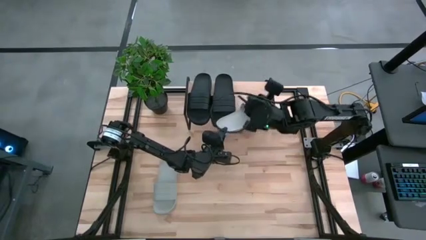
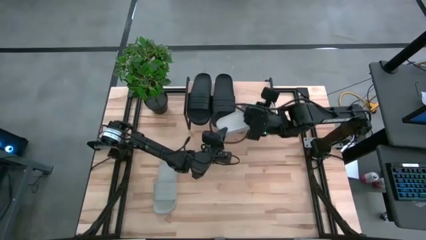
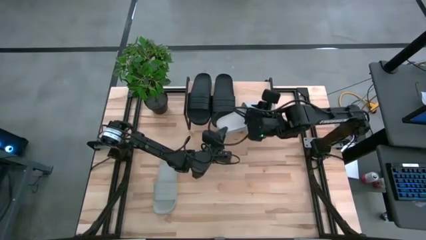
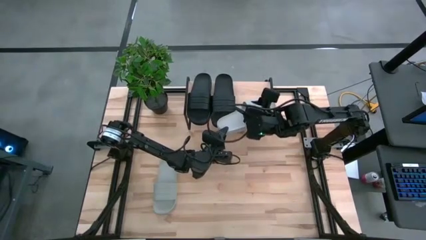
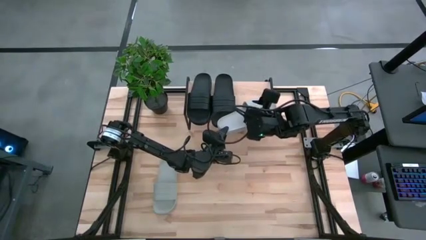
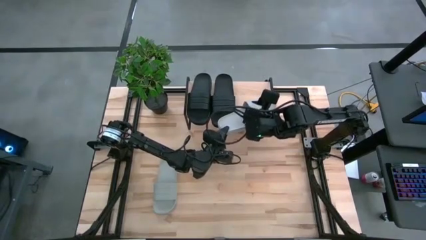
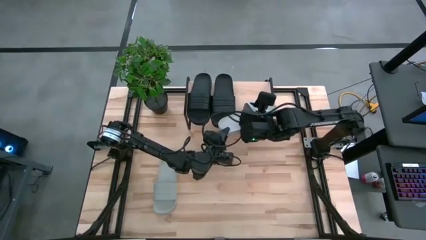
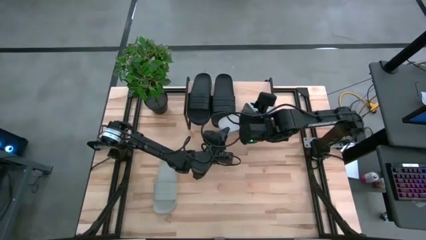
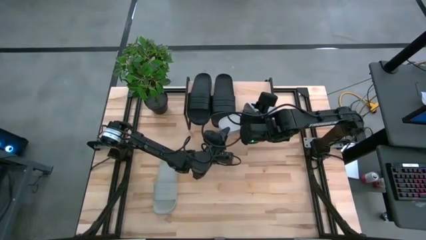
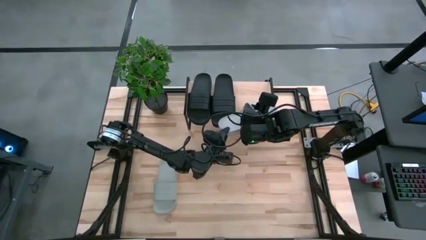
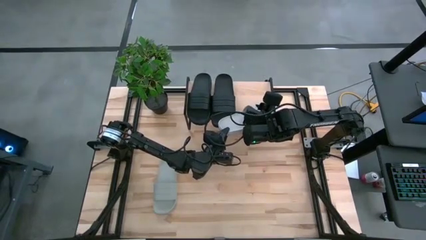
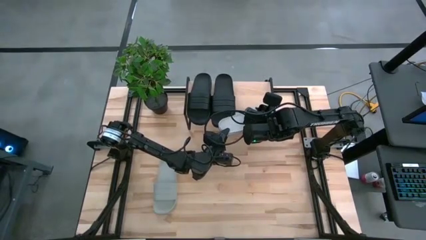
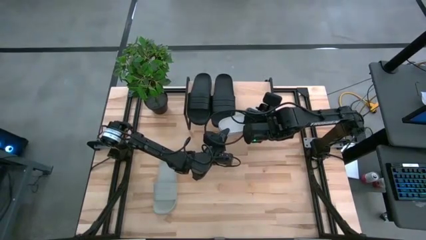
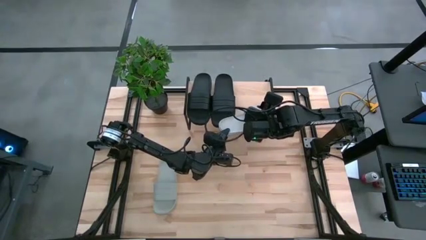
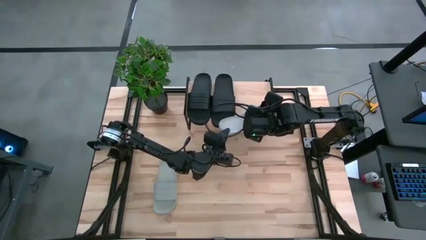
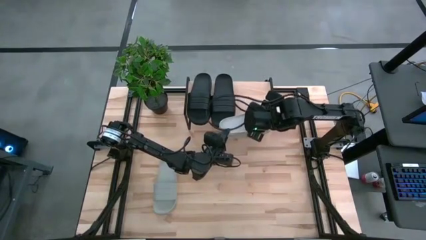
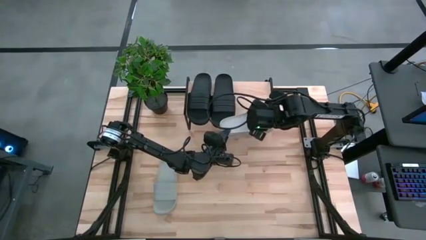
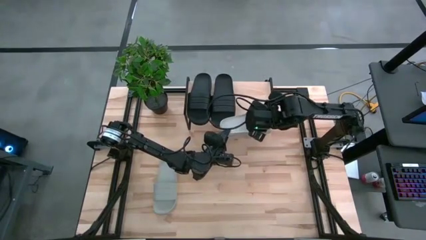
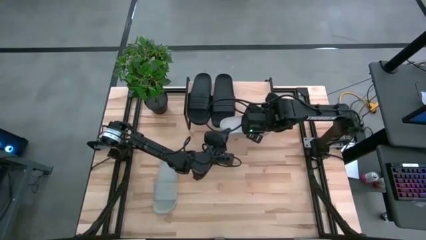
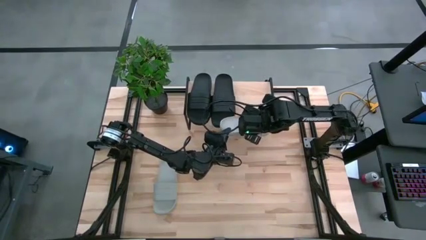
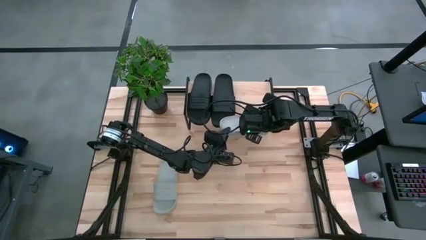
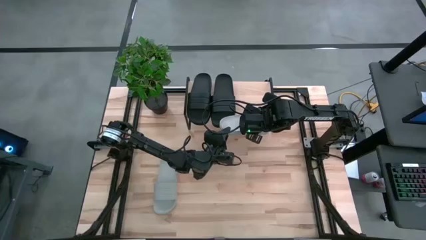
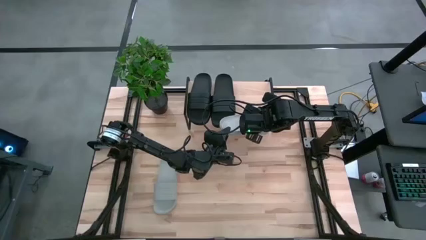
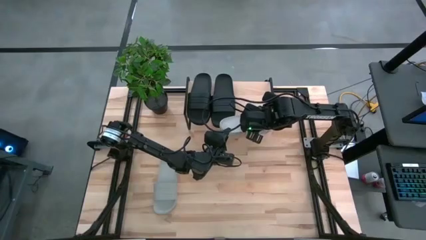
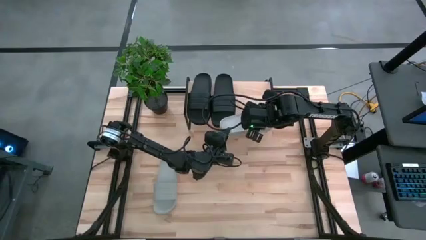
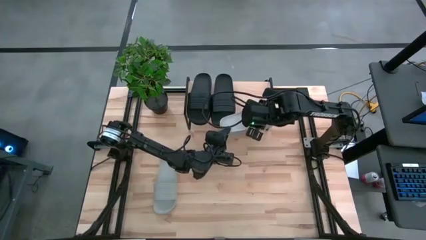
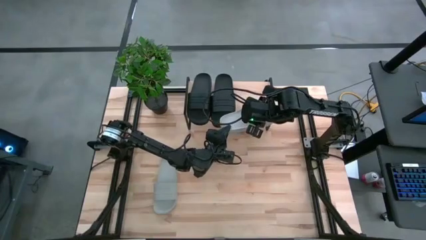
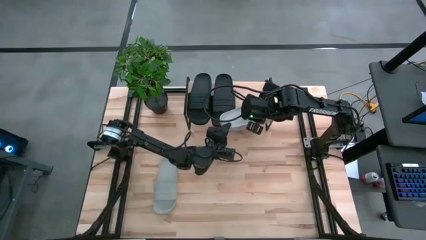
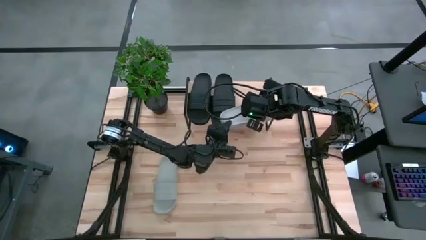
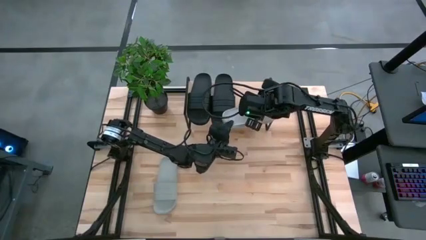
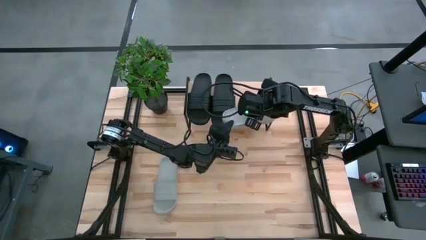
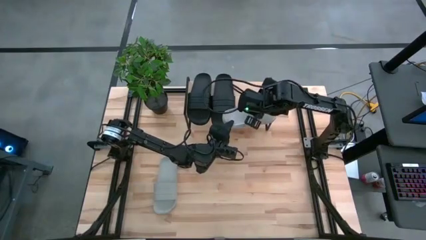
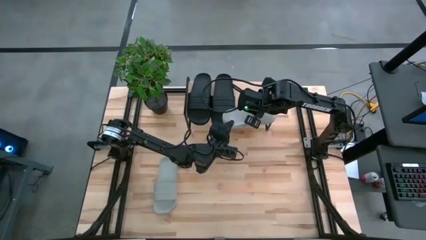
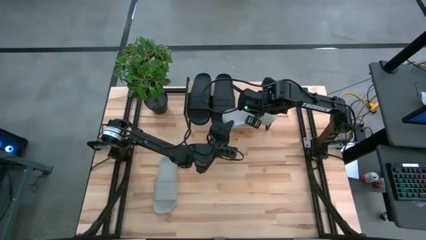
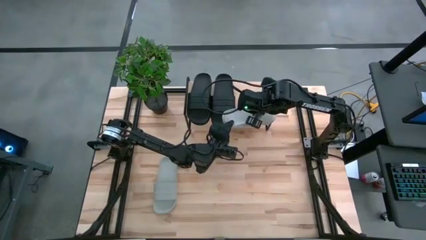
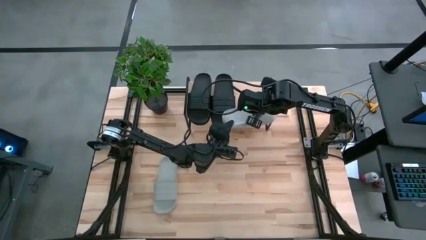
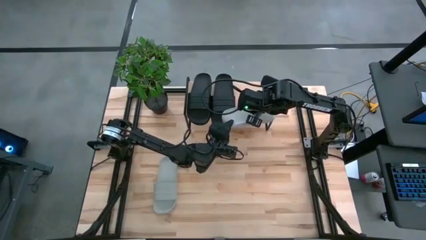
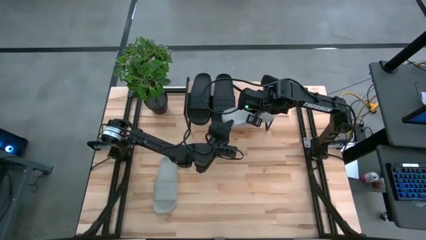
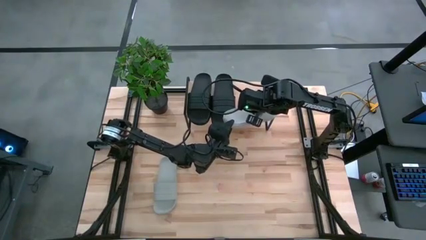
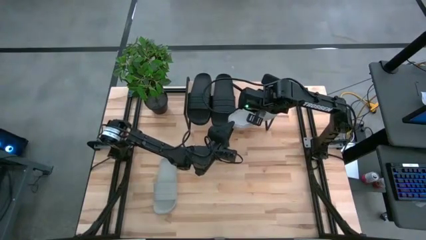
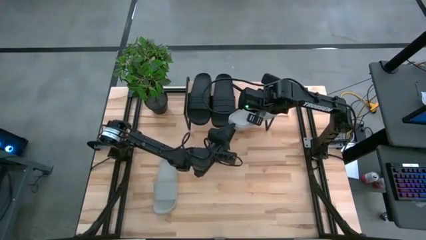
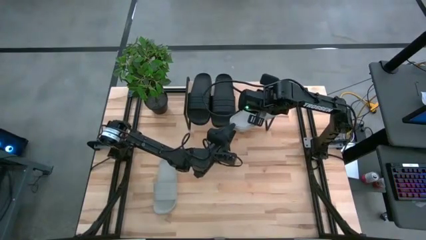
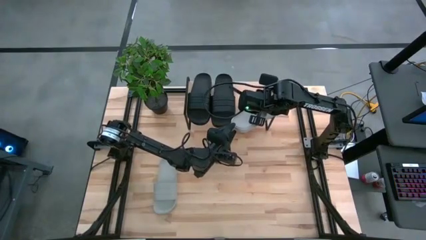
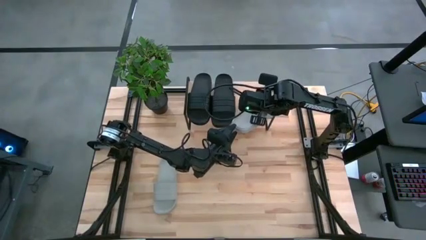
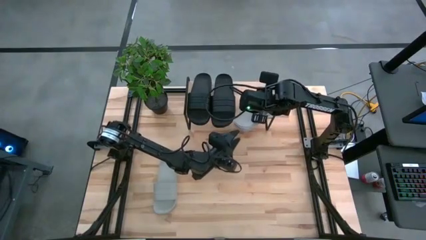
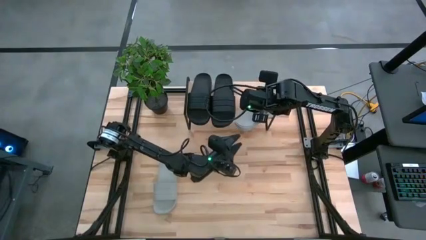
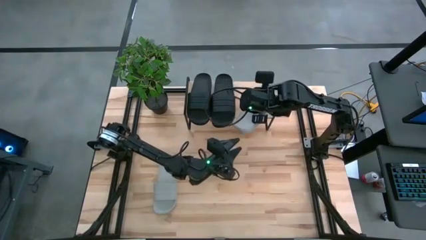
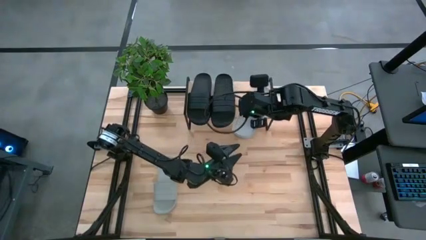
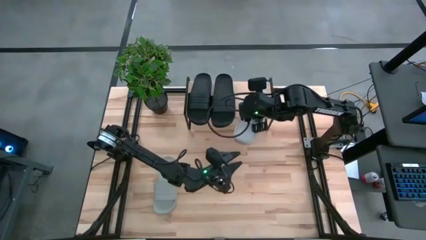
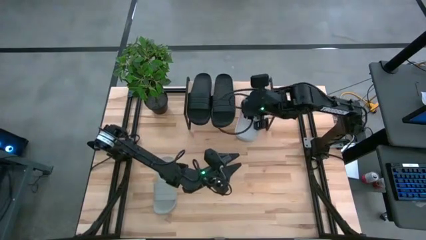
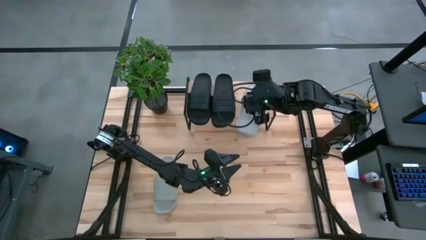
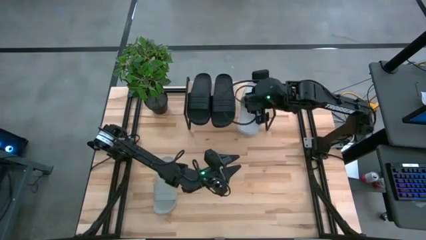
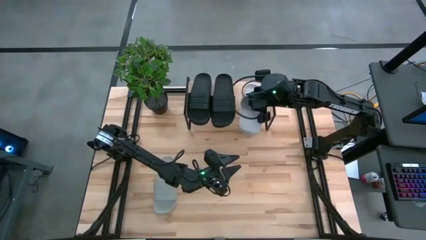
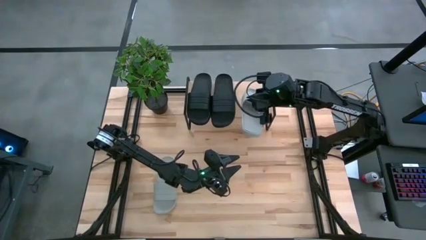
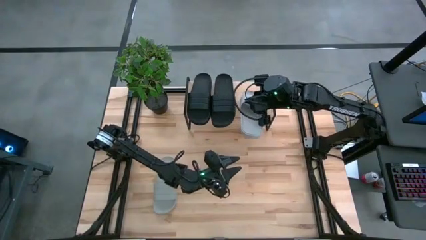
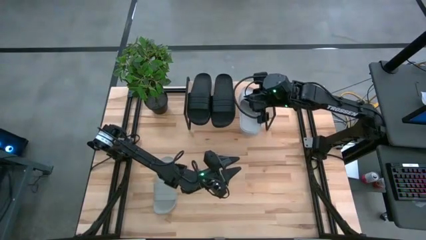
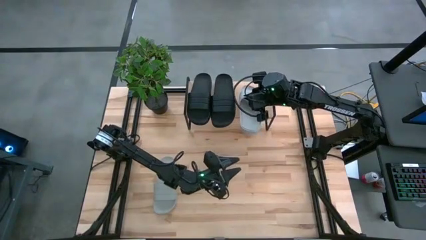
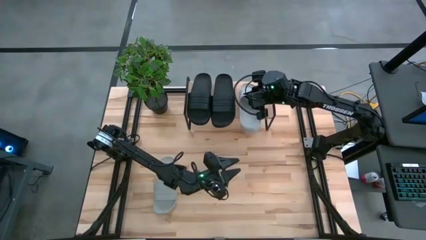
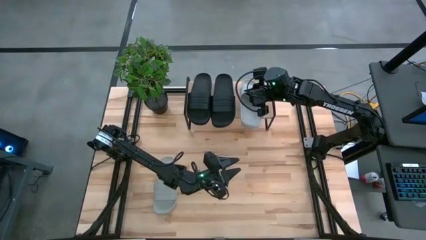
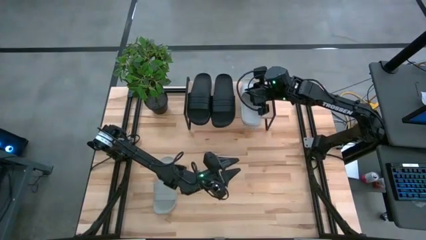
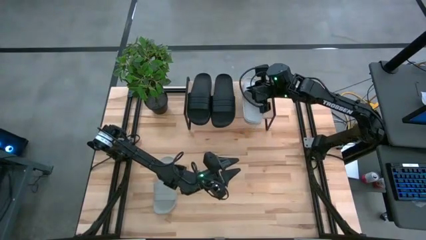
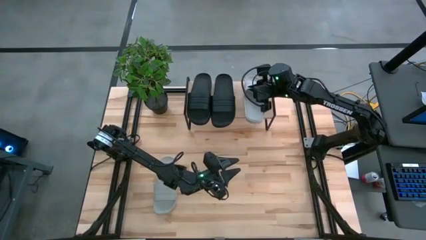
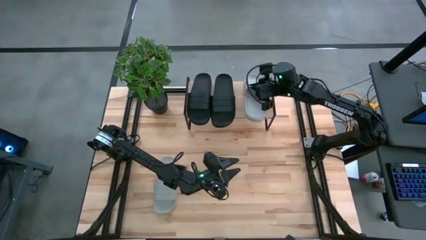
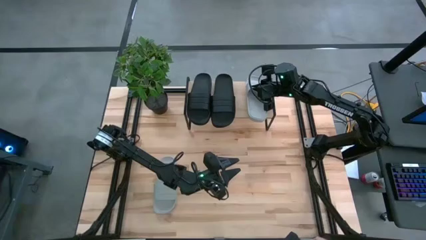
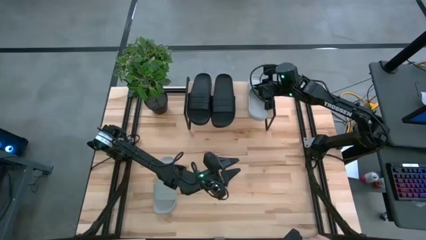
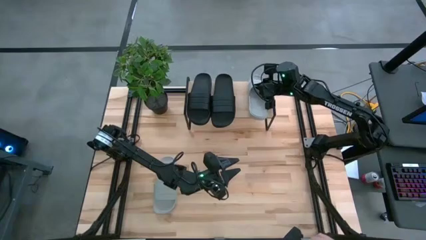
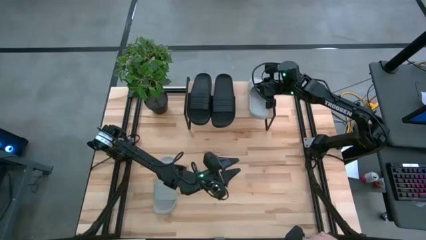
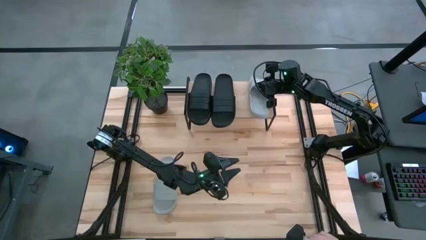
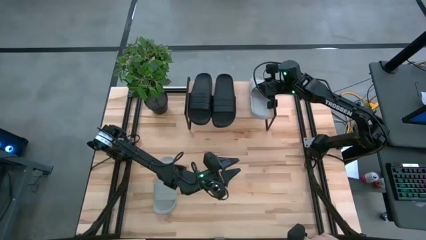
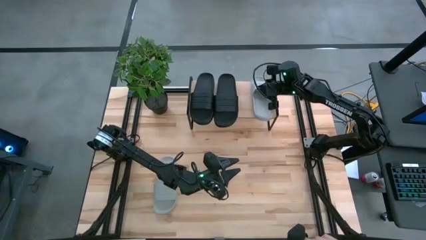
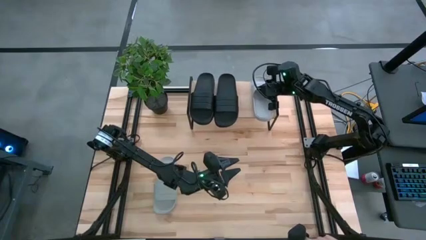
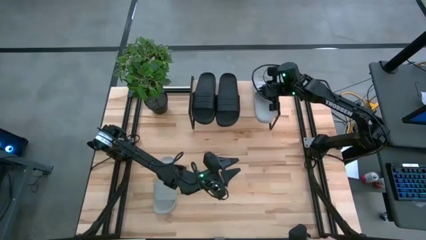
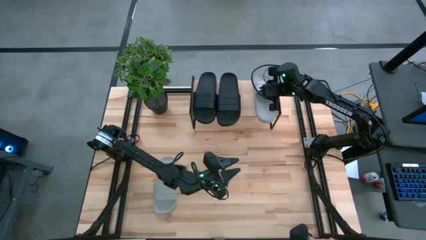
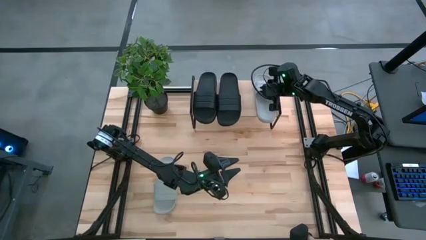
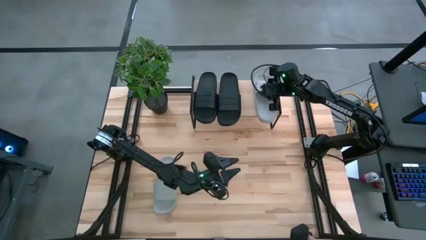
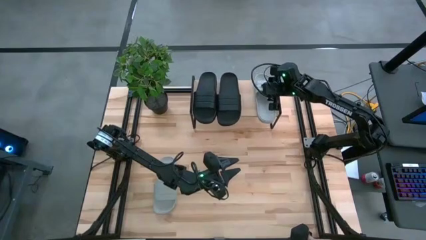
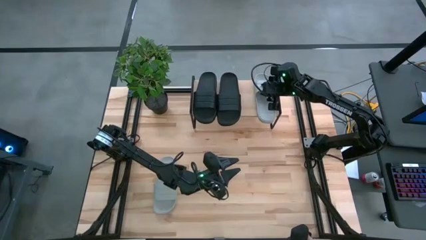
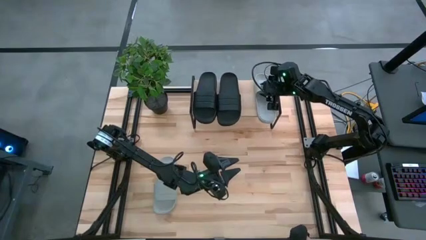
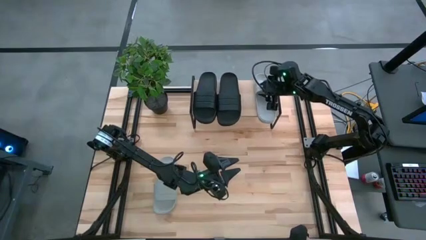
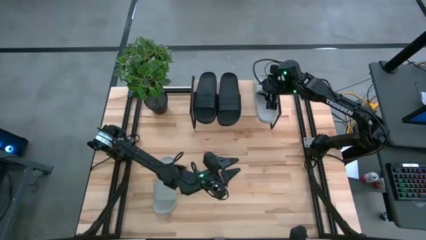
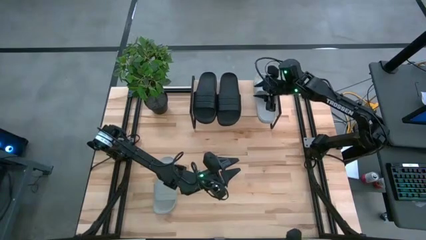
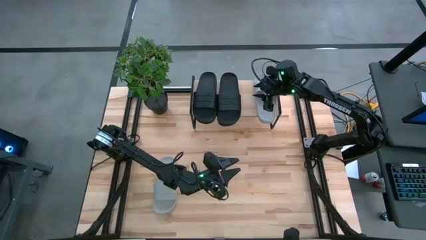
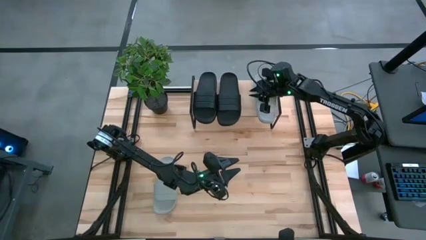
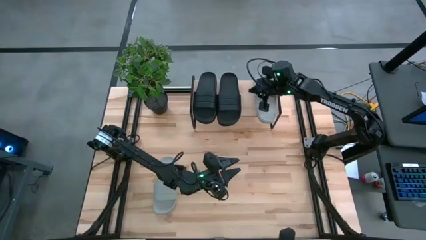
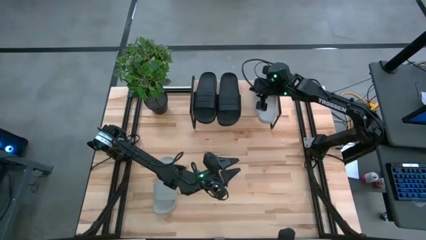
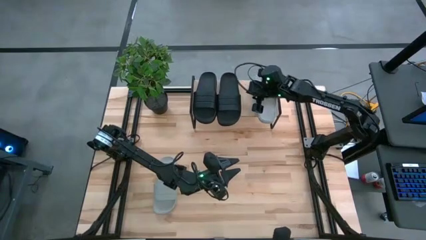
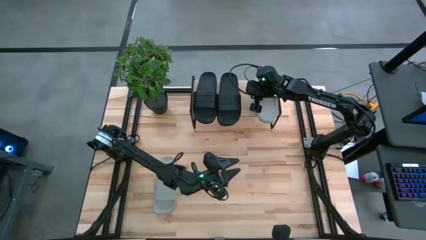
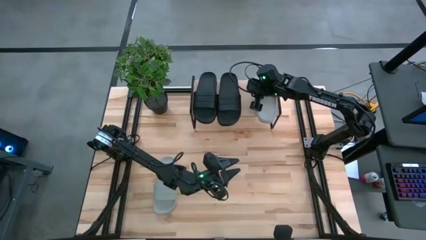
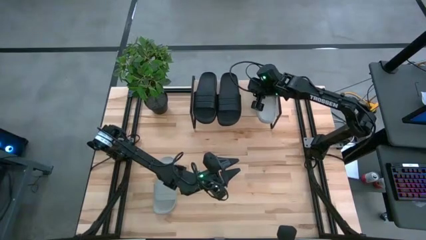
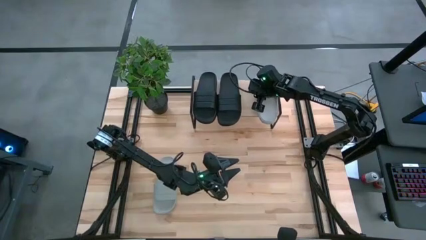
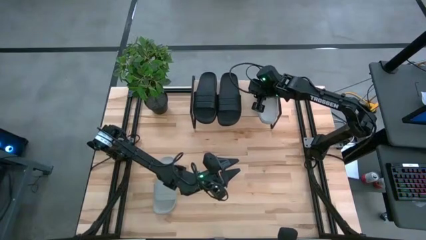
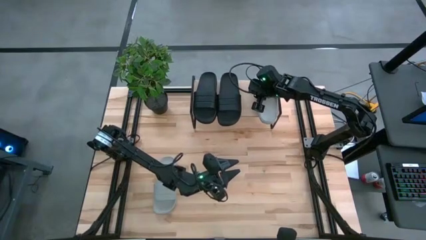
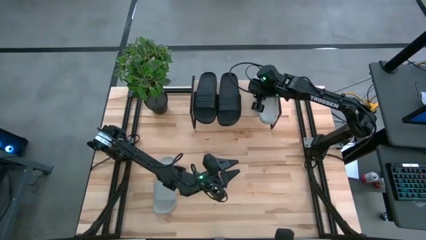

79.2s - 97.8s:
Task: Pick and place slides into the shelf
Put the right gray slide on the shelf
